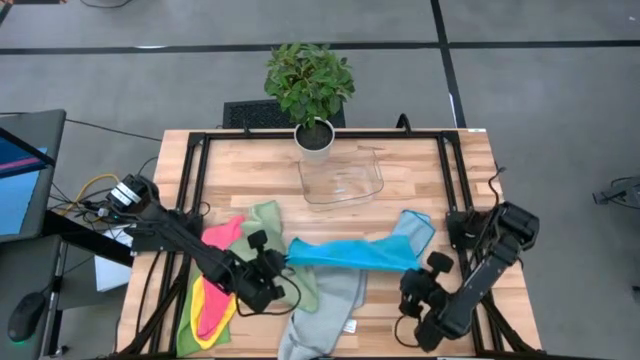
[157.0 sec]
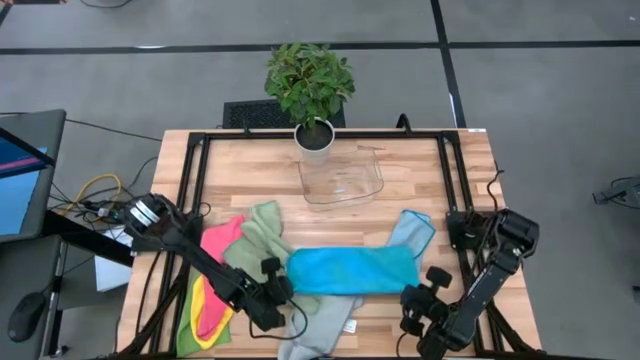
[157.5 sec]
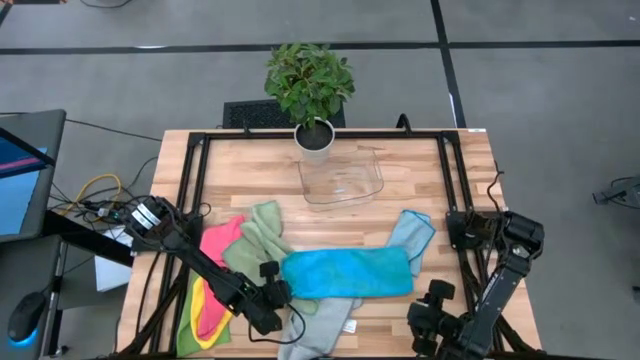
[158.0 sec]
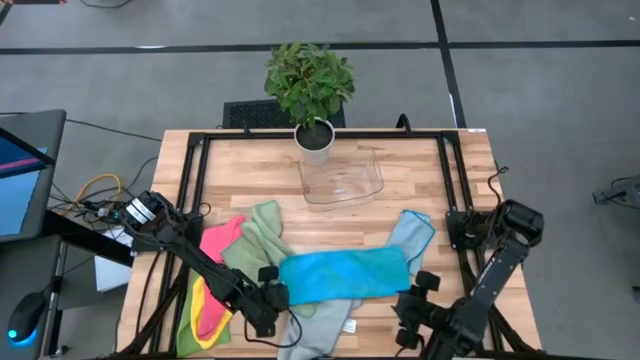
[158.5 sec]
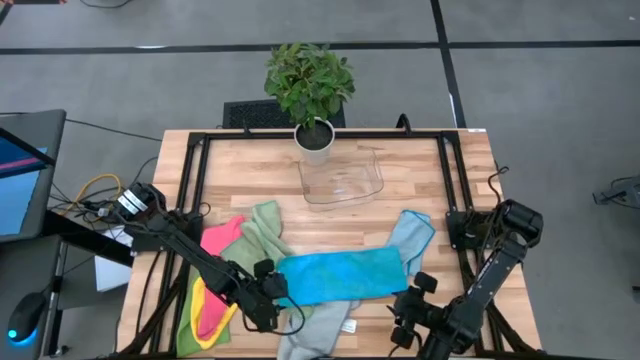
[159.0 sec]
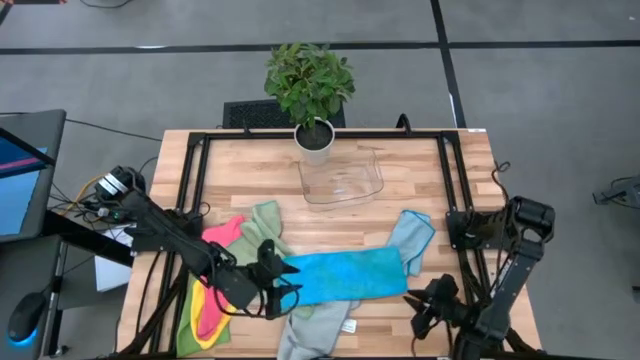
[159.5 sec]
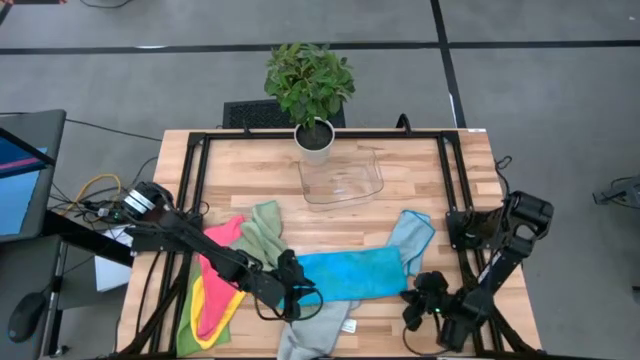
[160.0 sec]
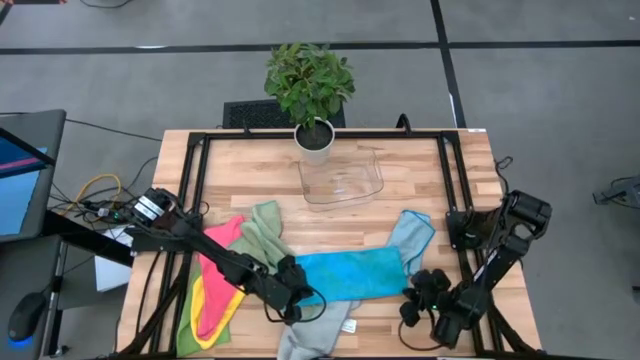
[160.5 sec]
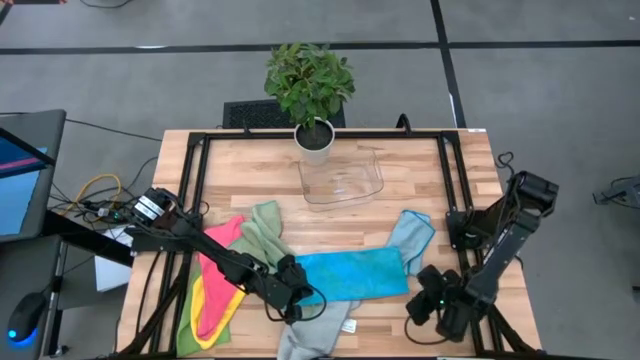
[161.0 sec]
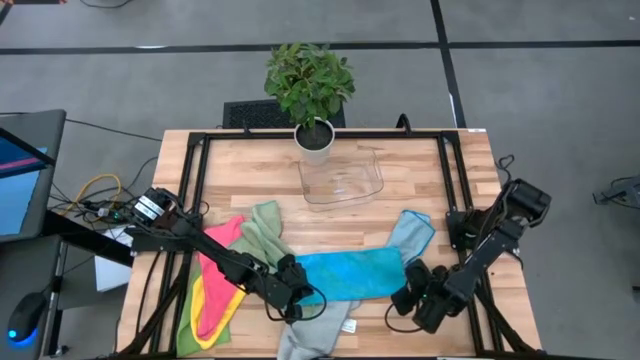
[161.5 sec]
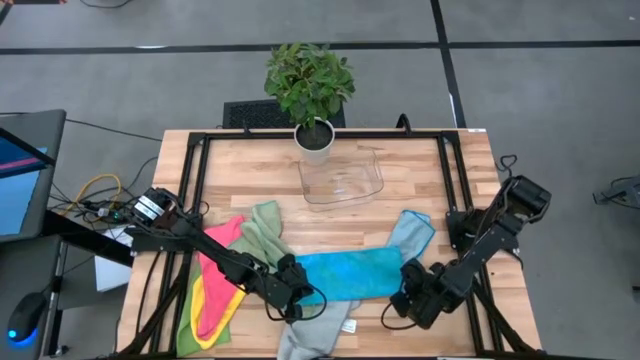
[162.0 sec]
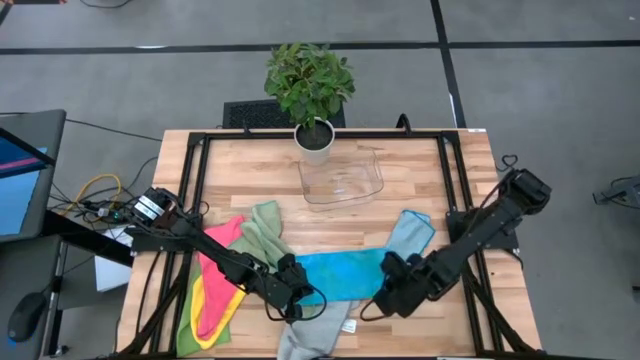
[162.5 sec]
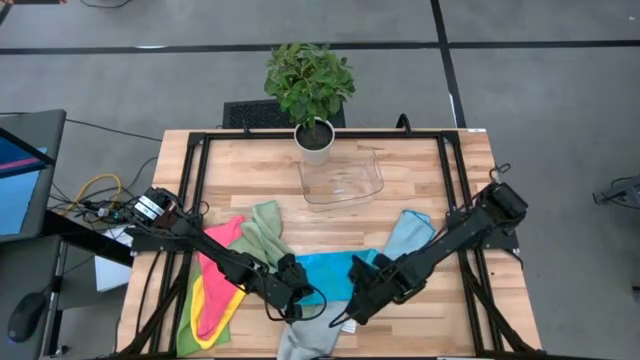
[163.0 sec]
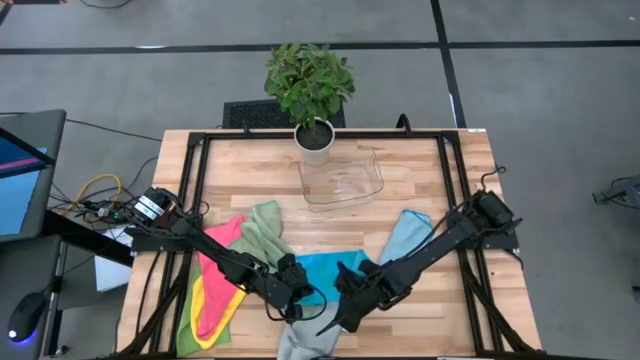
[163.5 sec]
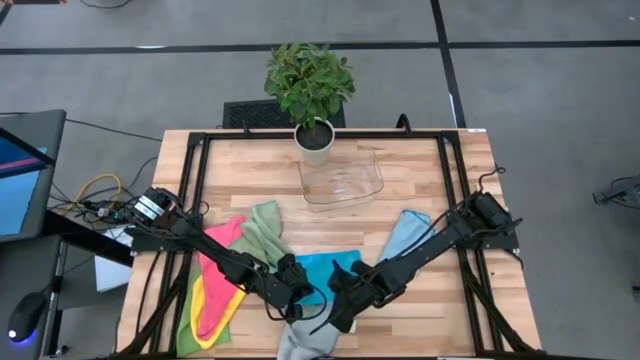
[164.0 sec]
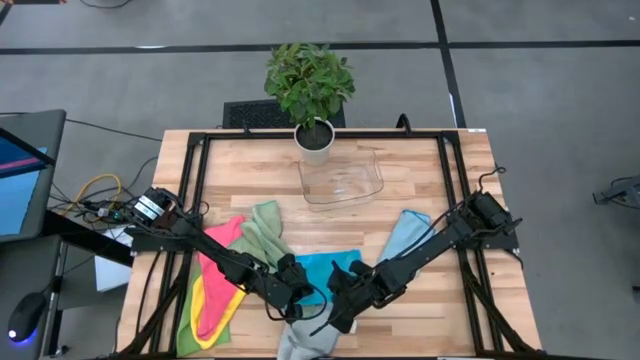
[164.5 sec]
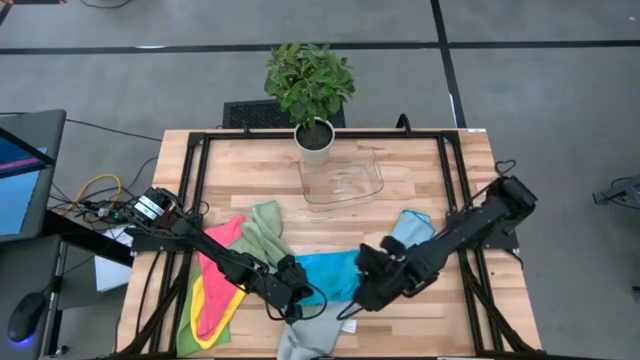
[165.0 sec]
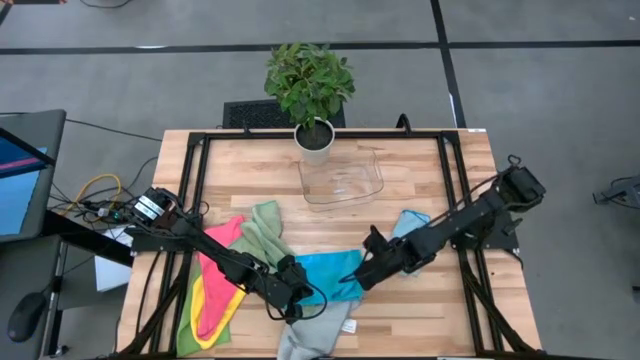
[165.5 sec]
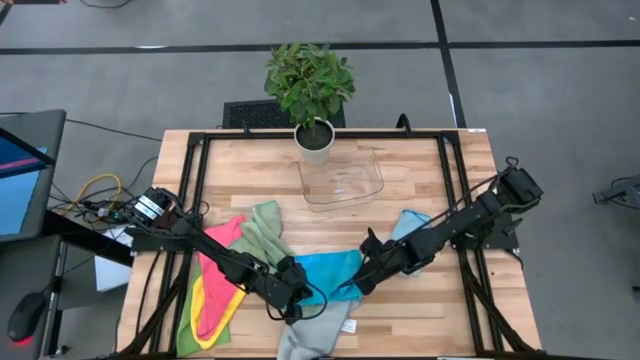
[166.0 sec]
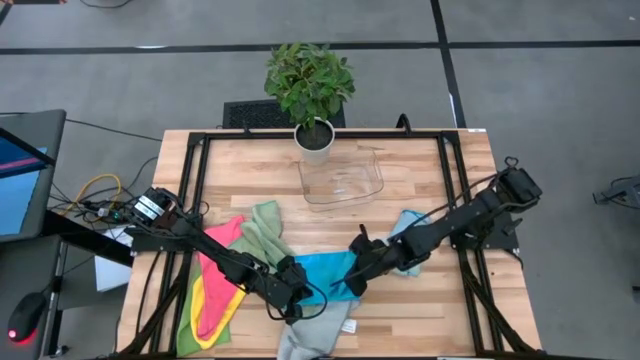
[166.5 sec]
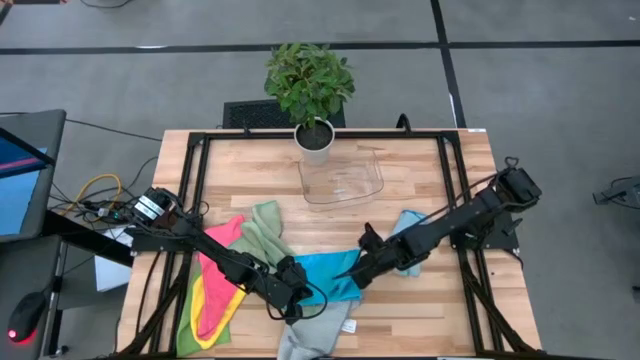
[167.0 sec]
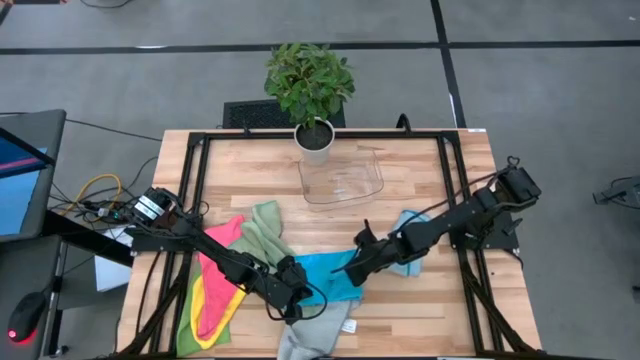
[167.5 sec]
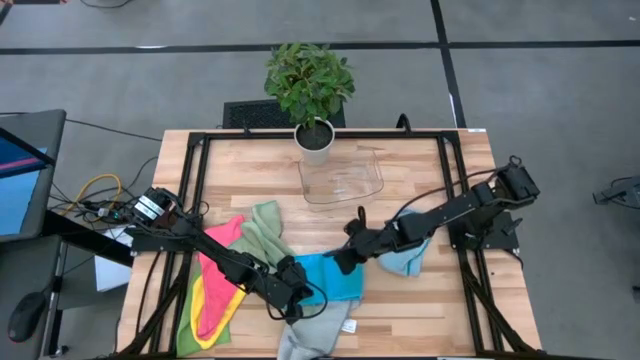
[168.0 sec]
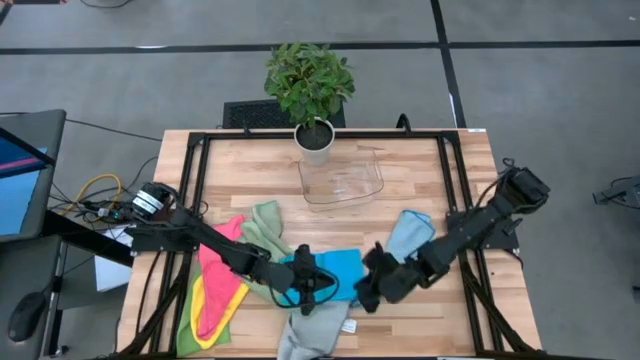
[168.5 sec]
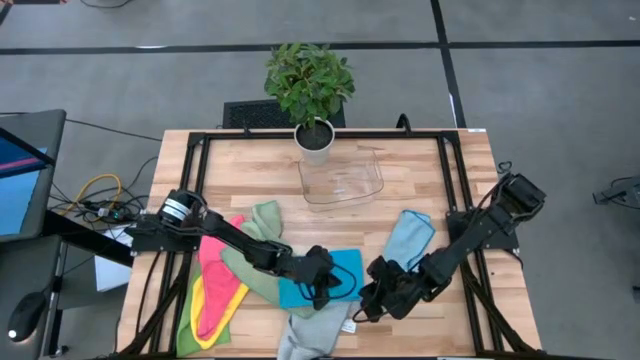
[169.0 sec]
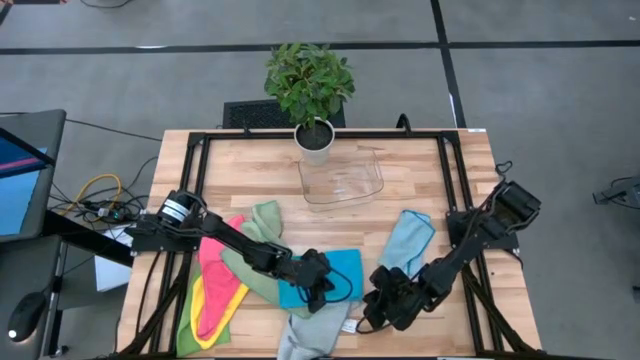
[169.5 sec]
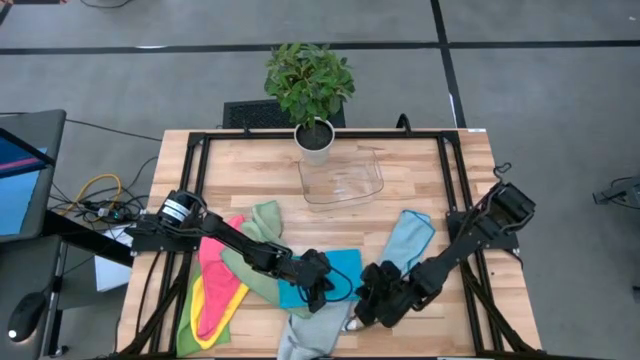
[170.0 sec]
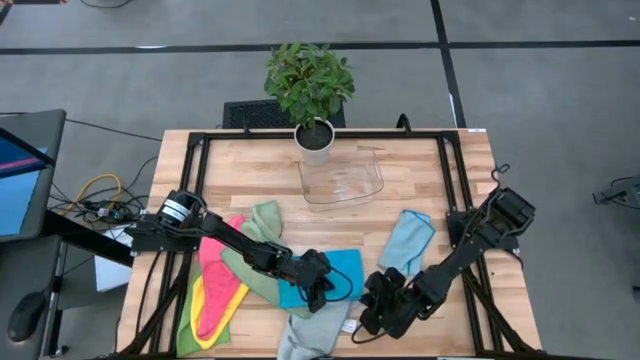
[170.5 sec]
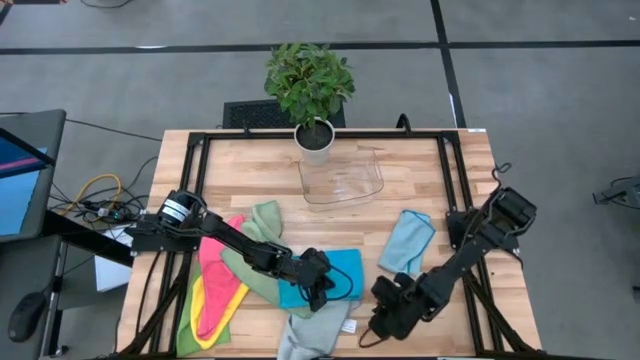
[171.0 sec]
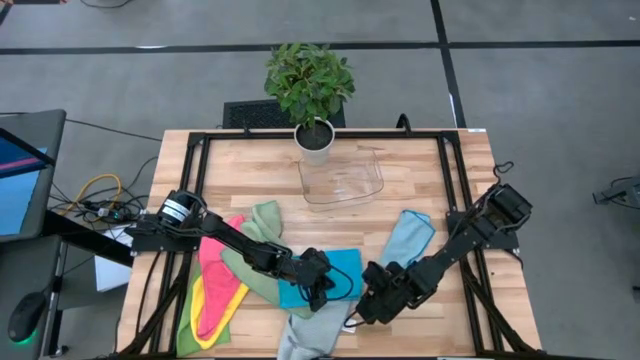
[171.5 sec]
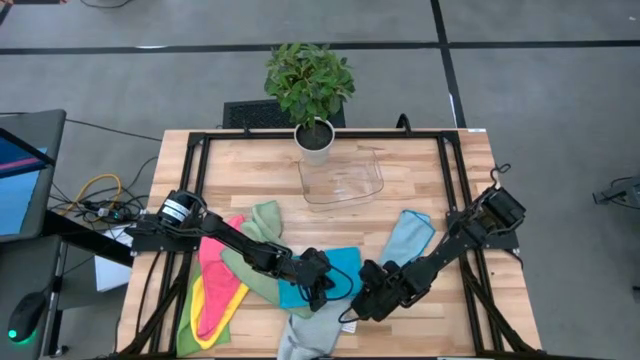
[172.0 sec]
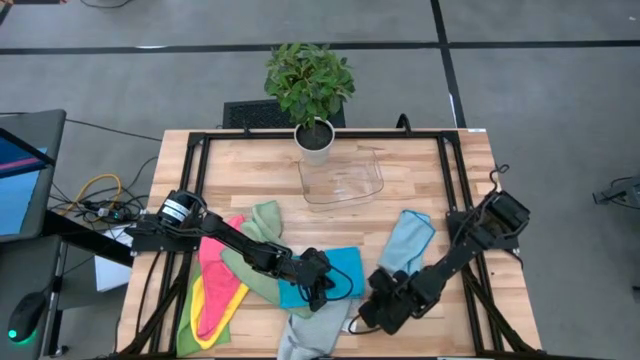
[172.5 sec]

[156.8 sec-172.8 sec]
Task: Fold microfiber towels
Fold the blue microfiber cloth
